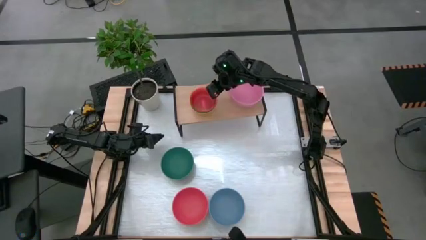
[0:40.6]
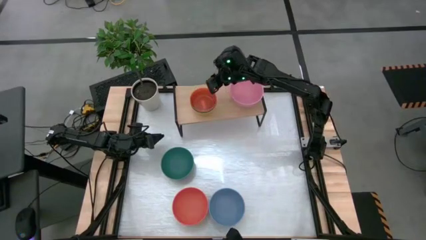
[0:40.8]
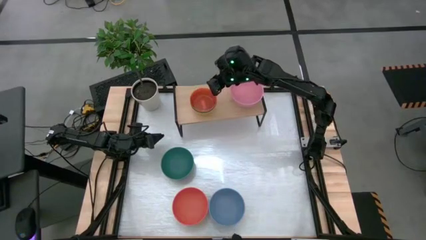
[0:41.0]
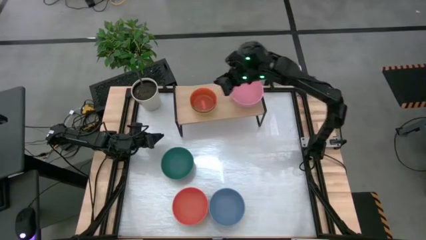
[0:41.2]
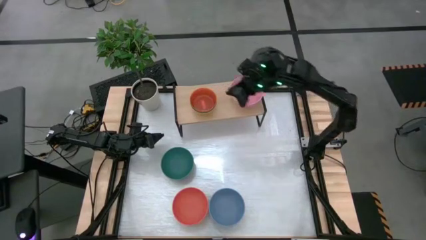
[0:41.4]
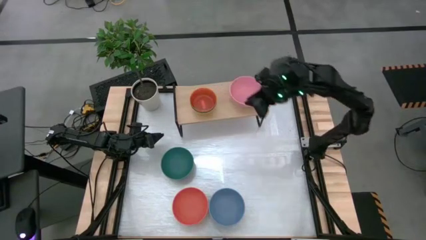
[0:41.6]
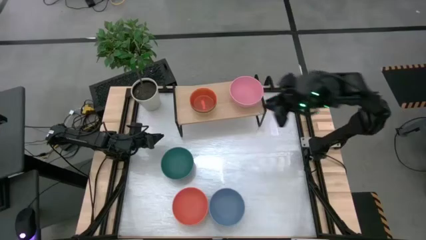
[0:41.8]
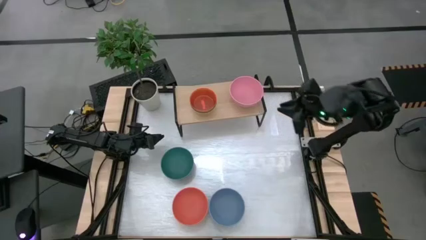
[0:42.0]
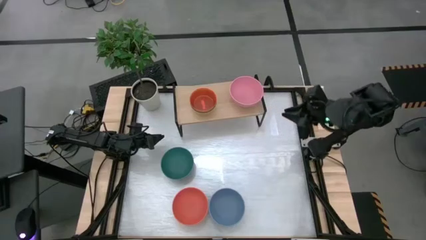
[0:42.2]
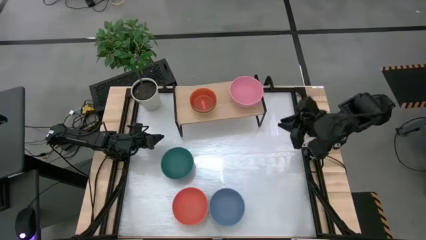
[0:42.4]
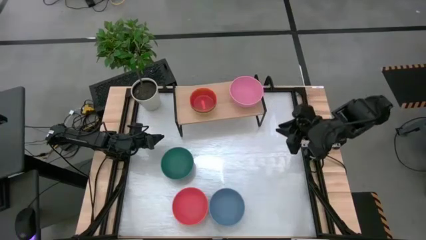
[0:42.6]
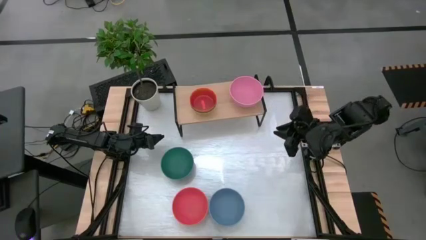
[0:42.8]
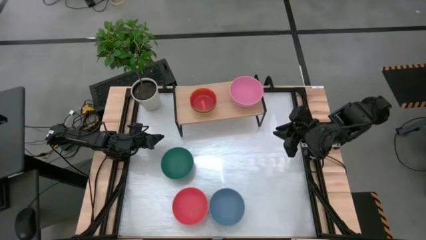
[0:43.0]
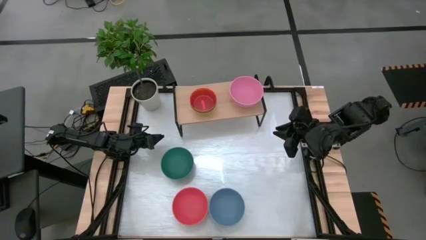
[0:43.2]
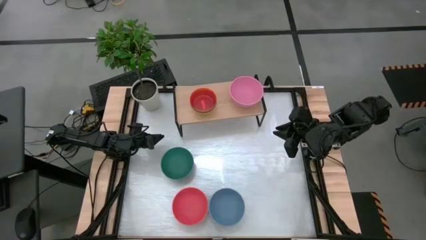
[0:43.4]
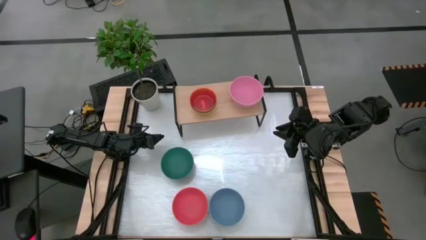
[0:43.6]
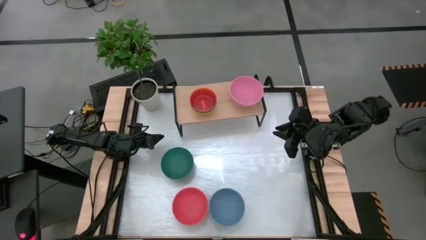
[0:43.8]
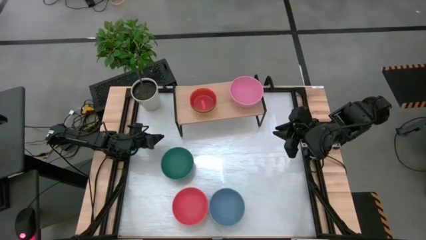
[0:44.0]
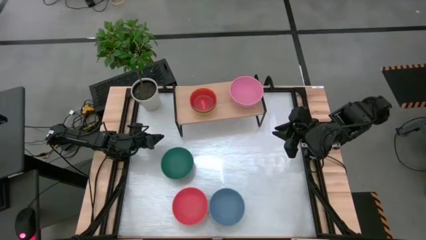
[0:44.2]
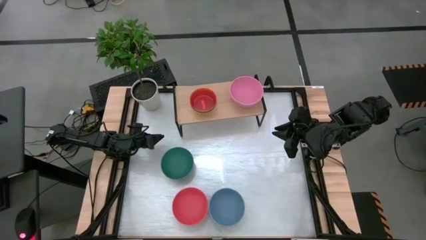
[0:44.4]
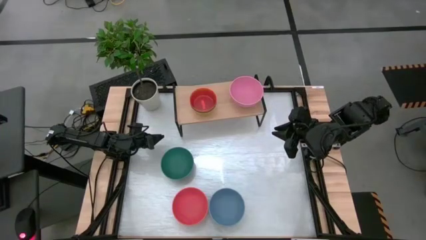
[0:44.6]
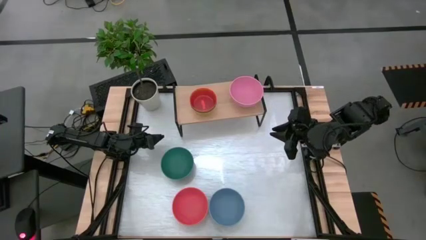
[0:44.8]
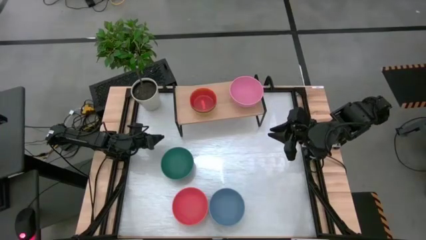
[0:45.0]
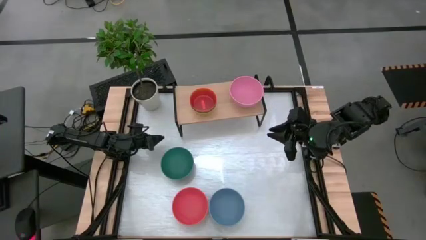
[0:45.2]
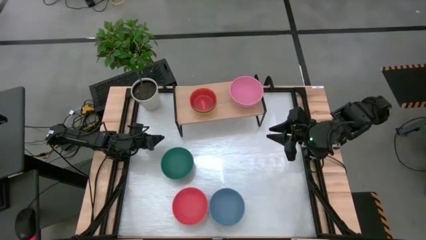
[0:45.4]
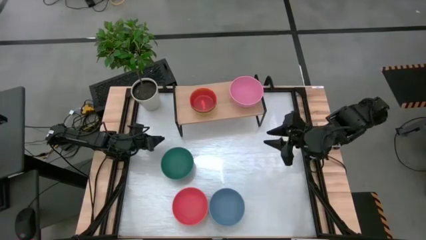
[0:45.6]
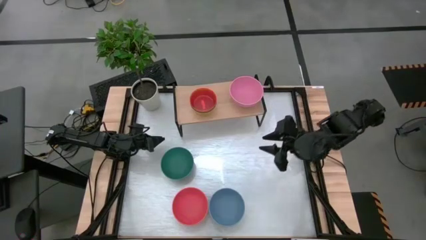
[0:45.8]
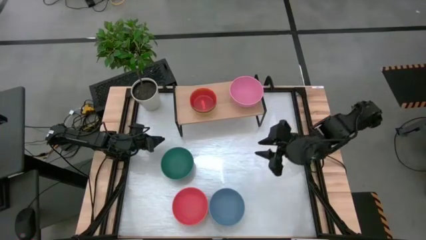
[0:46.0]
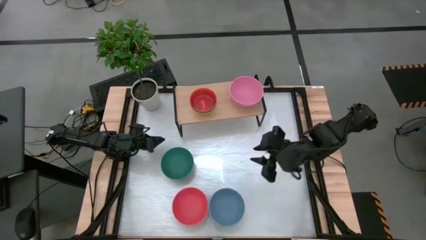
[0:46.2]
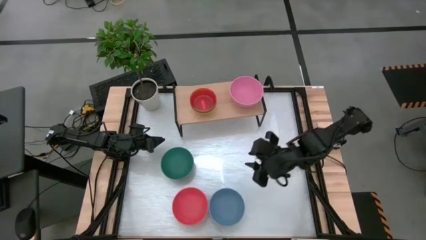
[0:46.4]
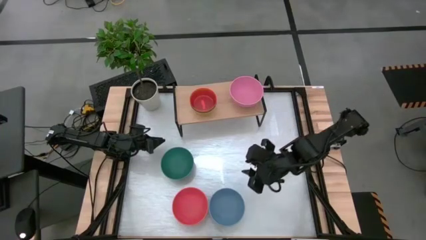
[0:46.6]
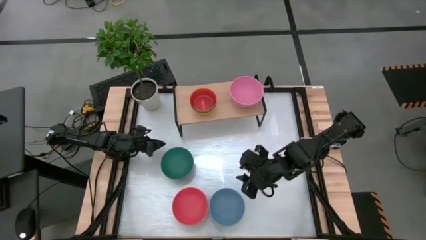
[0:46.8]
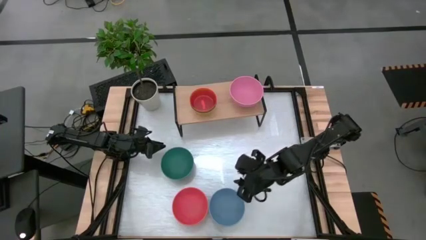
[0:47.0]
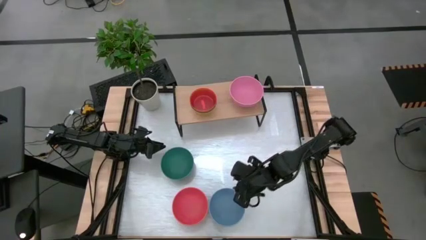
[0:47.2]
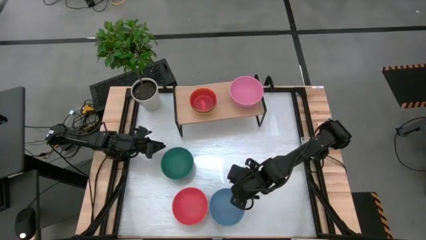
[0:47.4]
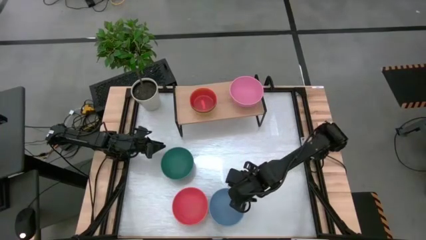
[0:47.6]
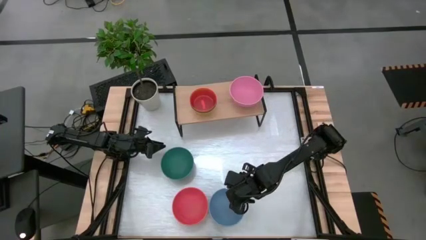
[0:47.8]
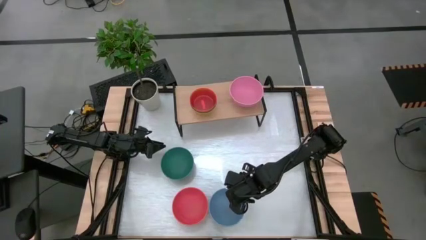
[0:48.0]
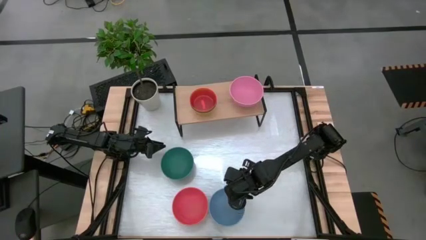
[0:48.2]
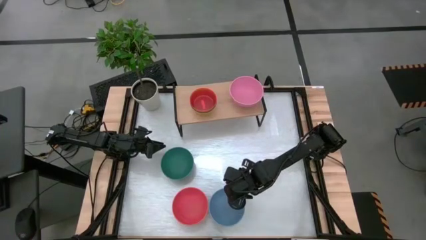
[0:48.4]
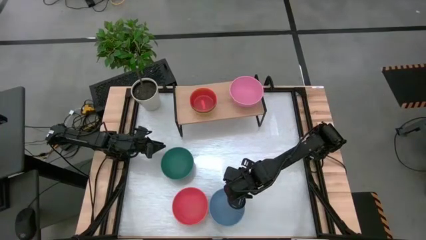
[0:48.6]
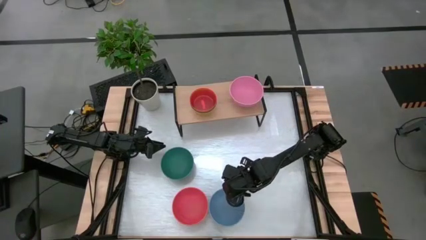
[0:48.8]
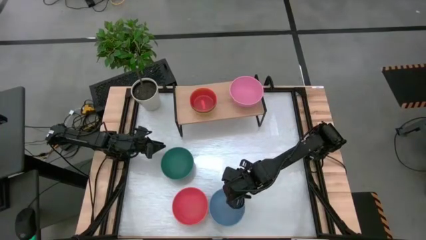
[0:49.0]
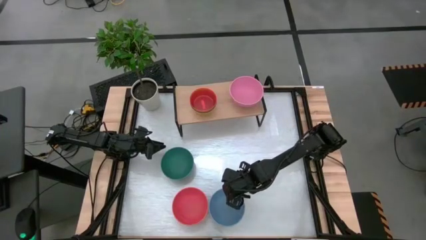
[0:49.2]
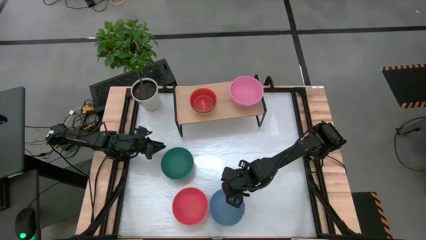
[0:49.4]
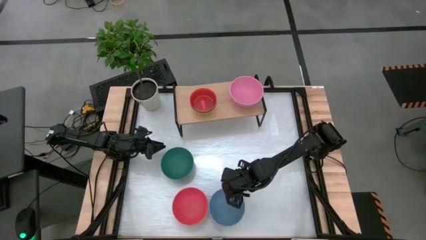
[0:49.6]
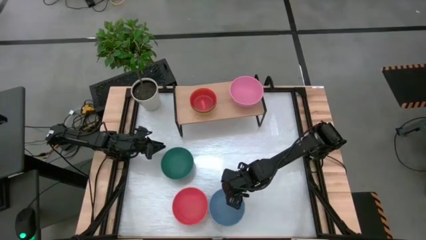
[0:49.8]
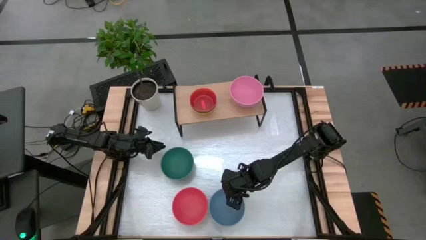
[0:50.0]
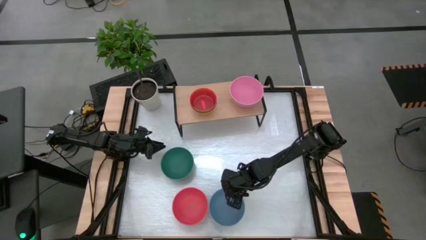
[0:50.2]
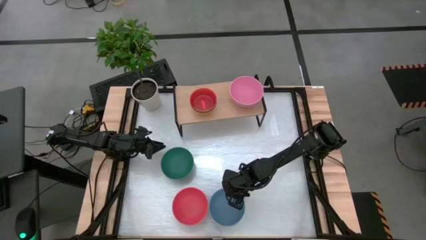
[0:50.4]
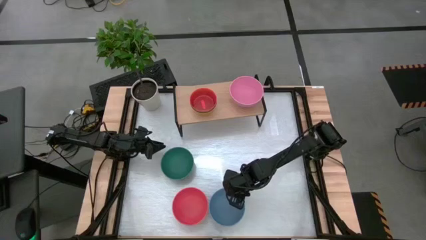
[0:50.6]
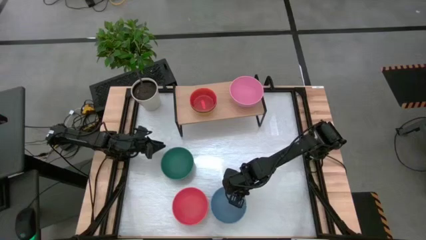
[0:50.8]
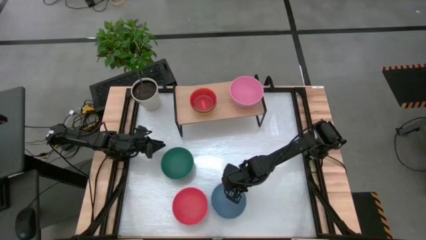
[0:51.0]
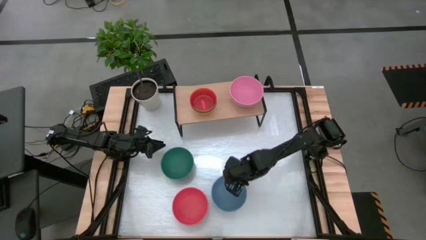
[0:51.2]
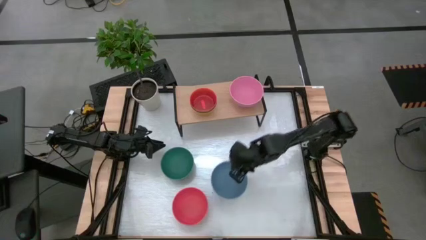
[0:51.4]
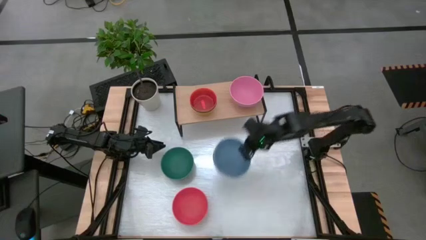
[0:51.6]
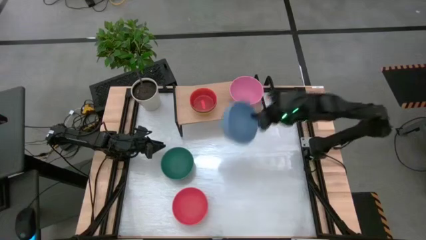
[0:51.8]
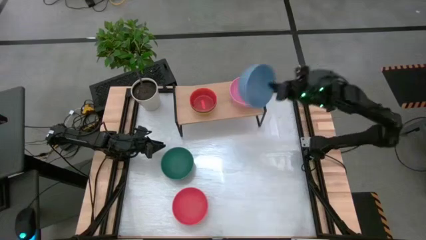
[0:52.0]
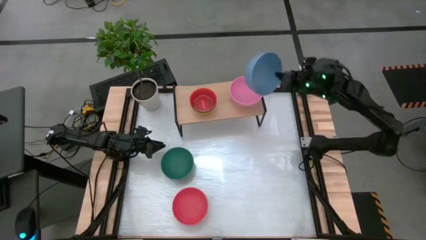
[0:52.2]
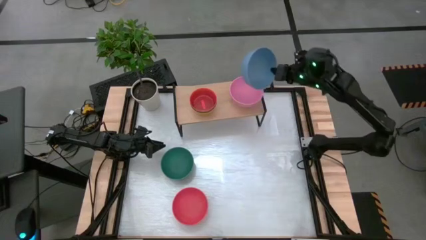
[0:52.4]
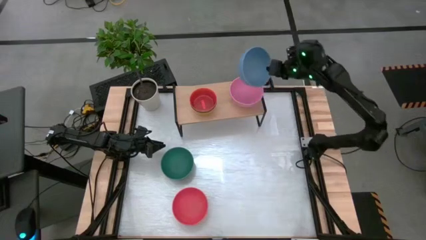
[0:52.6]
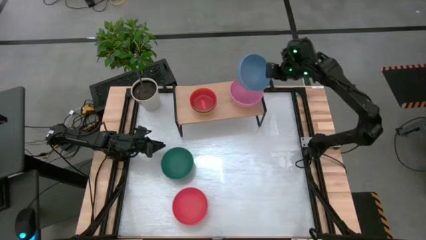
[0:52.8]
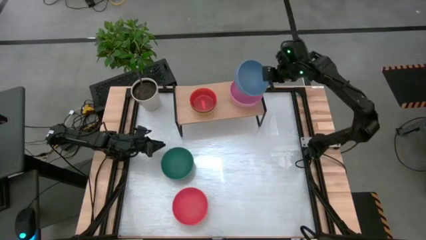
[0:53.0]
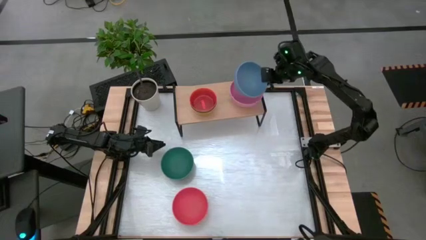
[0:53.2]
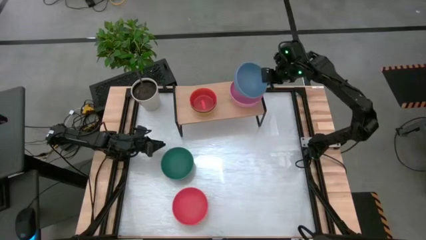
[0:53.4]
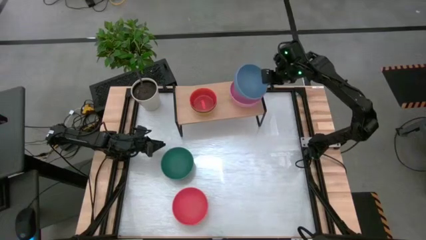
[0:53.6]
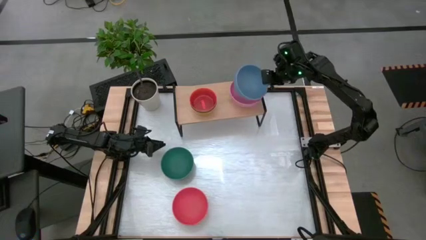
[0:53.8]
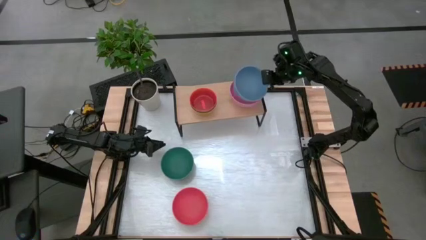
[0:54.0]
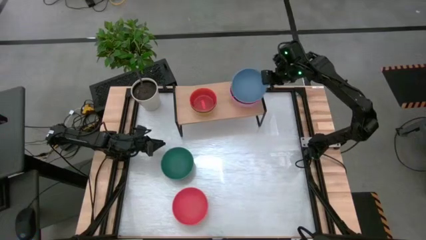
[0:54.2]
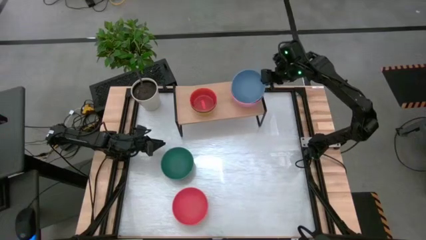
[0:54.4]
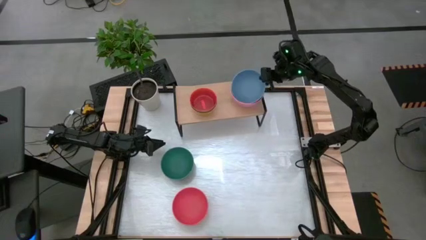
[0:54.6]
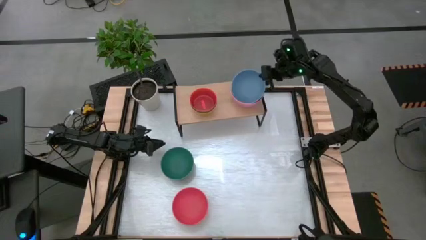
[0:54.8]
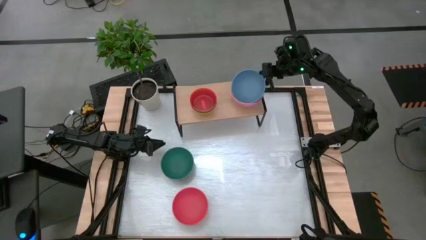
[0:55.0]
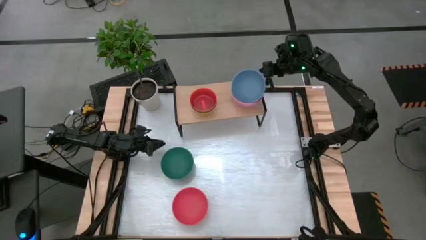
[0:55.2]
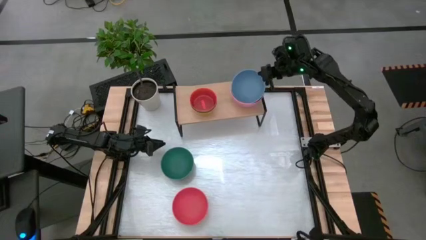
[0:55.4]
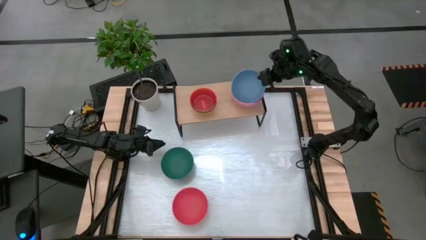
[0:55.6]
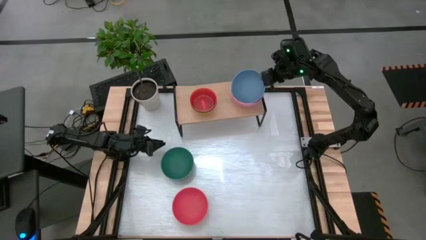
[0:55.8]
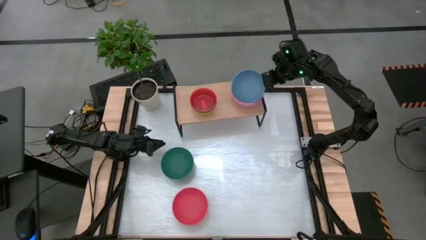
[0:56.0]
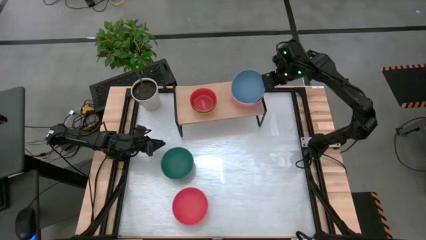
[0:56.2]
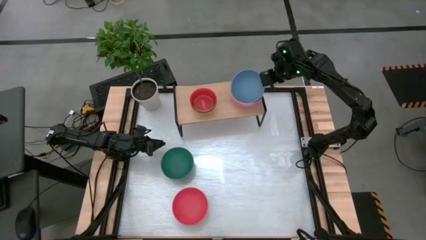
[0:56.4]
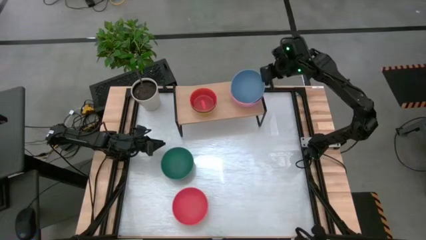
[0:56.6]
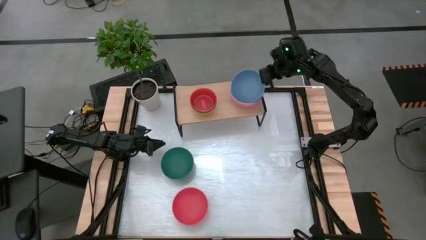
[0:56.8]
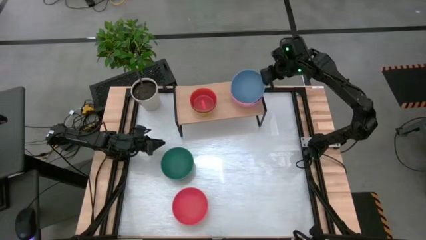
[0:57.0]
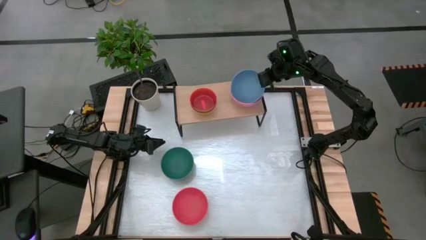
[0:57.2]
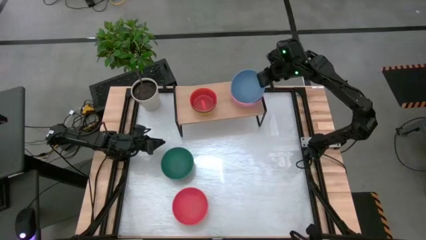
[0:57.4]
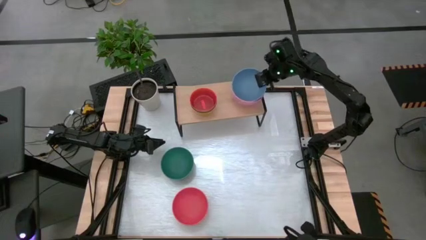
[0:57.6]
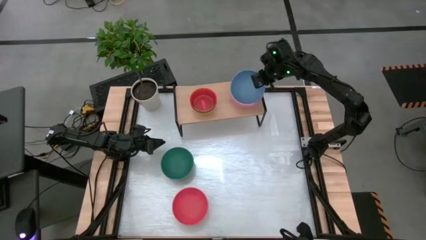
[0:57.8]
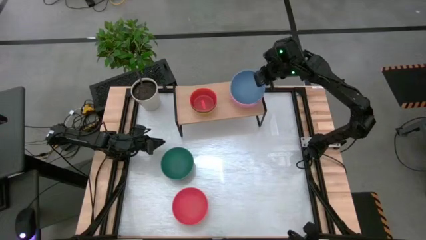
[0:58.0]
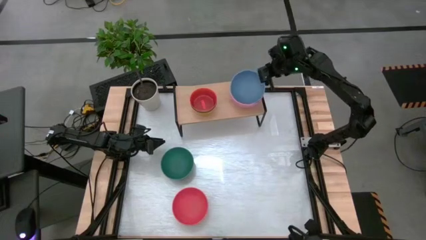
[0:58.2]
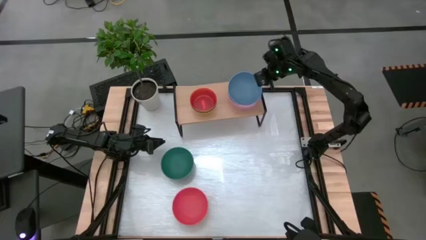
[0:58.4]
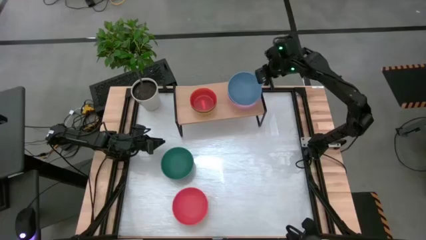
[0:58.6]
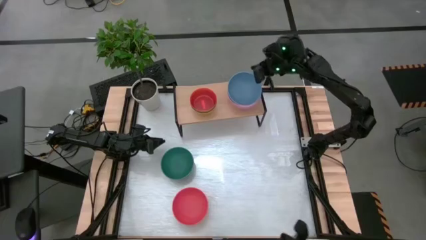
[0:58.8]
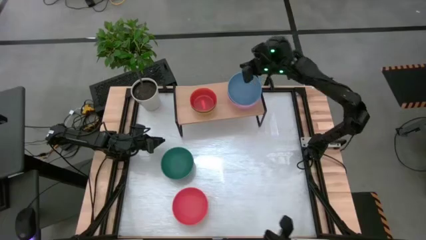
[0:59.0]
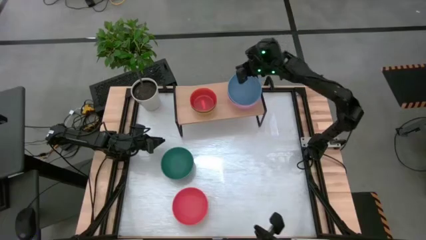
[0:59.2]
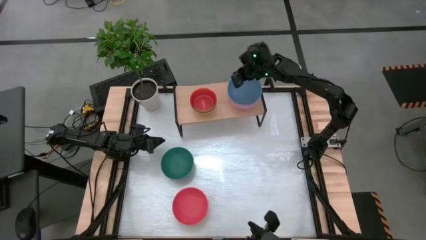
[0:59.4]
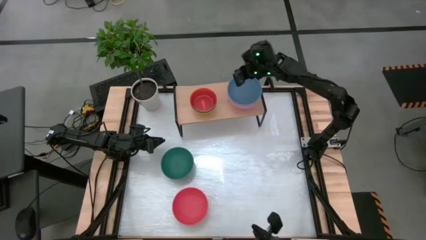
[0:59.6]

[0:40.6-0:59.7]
Task: Place and stack bowls onto a shelf
Stack the blue bowl on top of the pink bowl on the shelf
